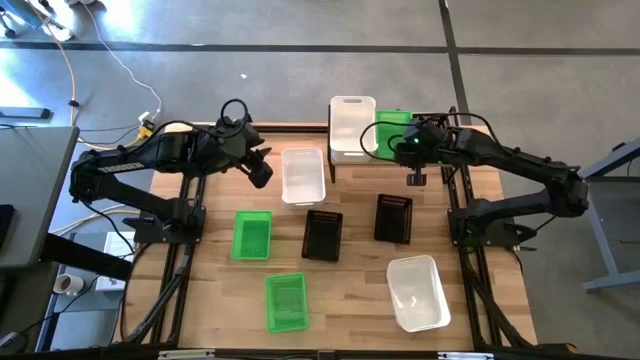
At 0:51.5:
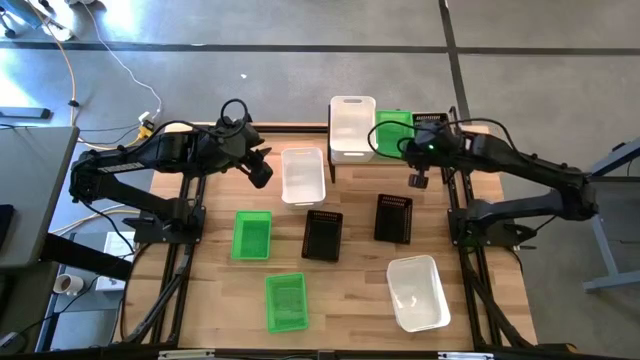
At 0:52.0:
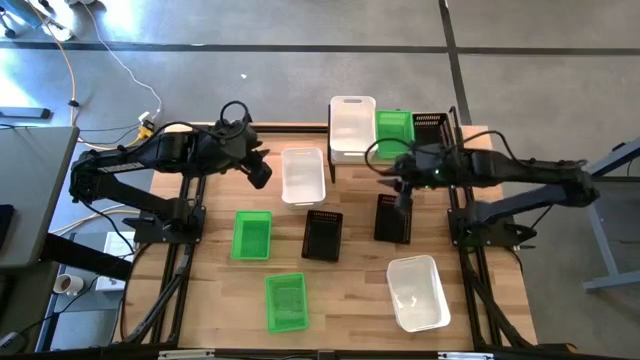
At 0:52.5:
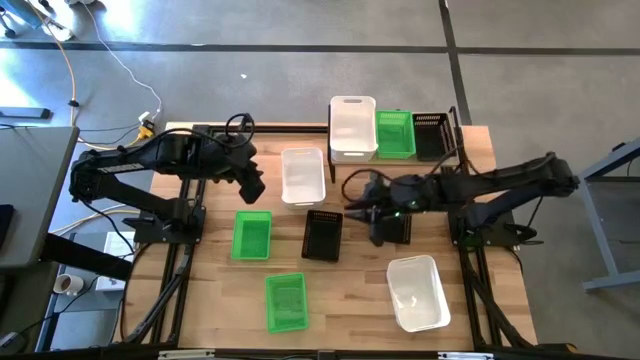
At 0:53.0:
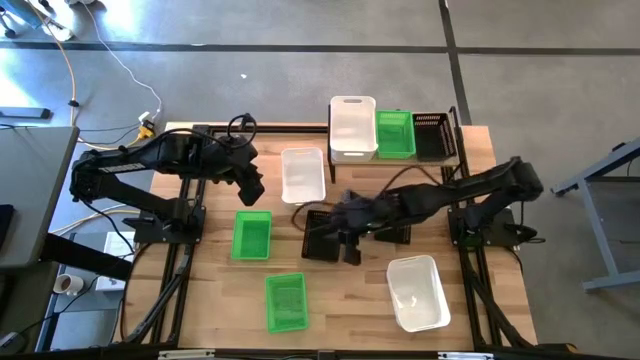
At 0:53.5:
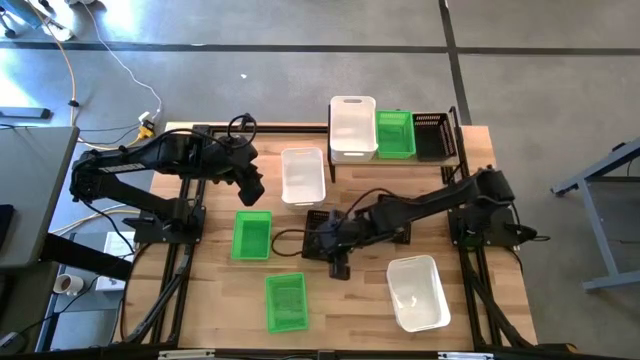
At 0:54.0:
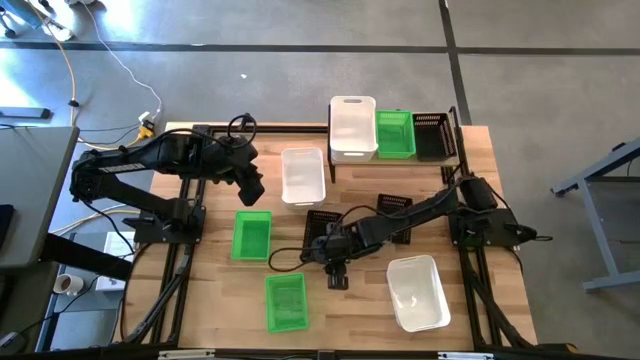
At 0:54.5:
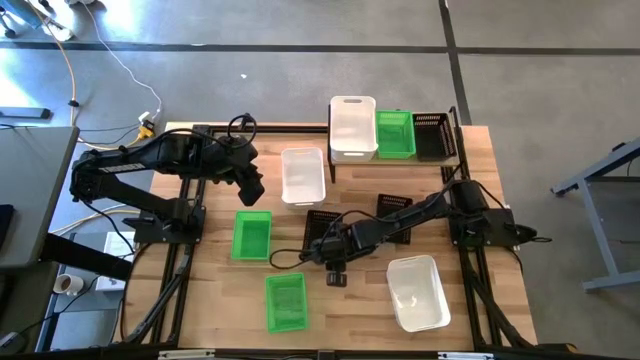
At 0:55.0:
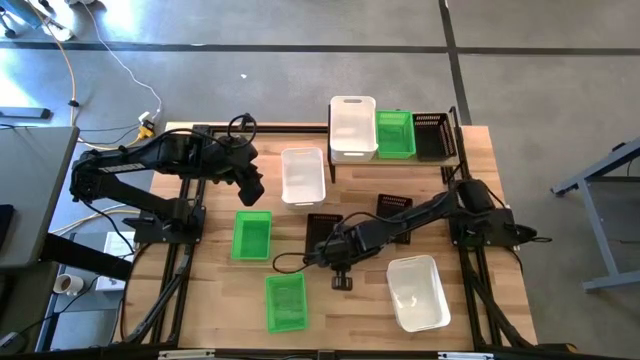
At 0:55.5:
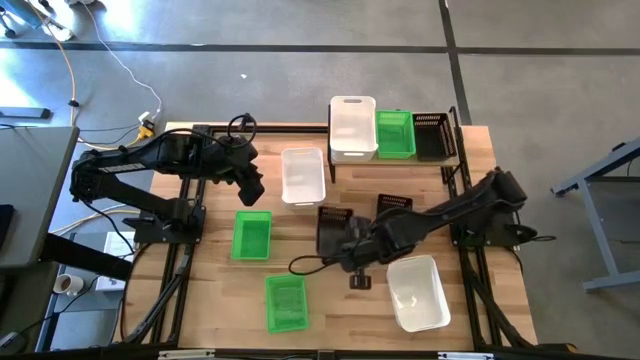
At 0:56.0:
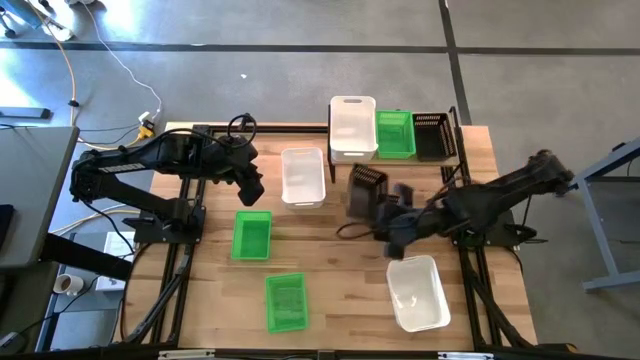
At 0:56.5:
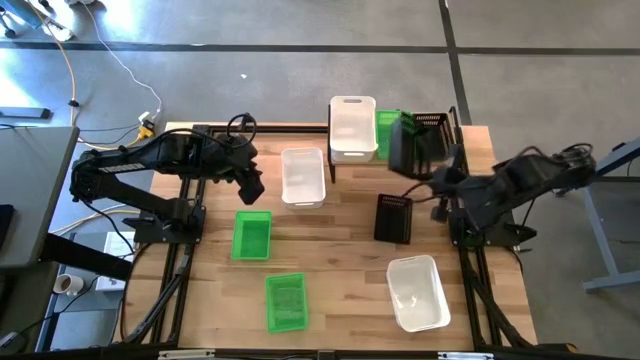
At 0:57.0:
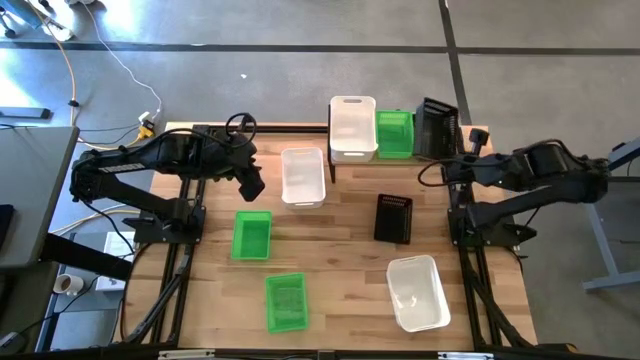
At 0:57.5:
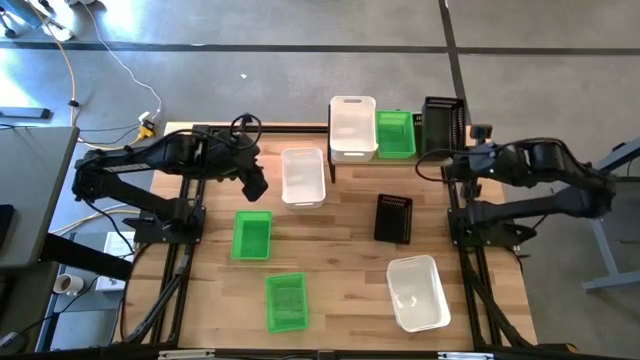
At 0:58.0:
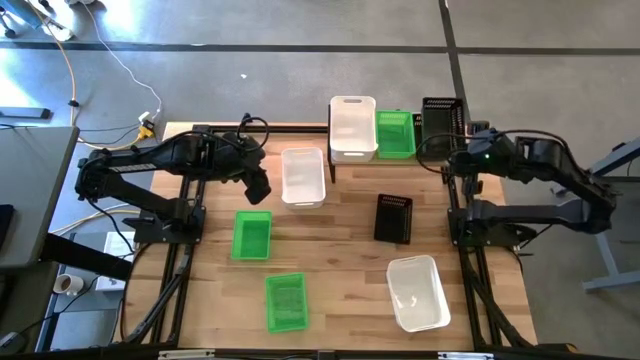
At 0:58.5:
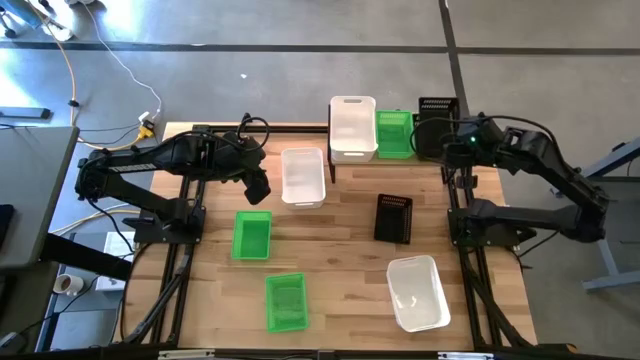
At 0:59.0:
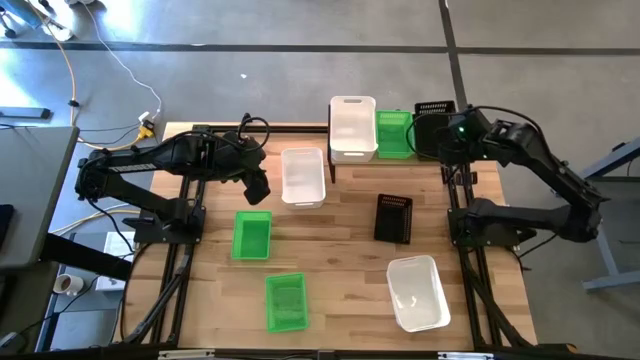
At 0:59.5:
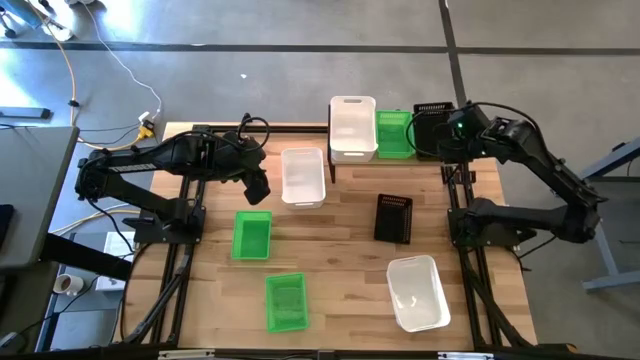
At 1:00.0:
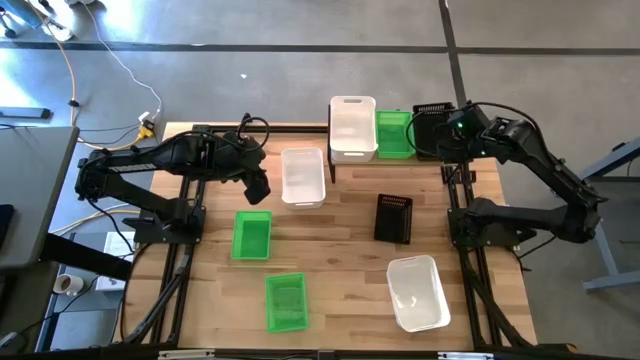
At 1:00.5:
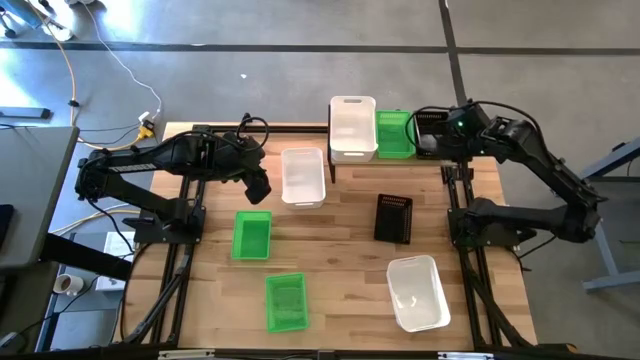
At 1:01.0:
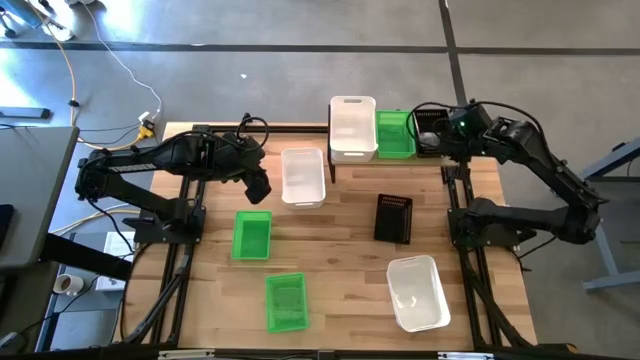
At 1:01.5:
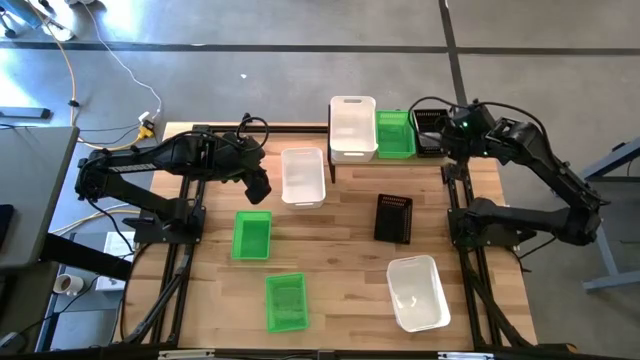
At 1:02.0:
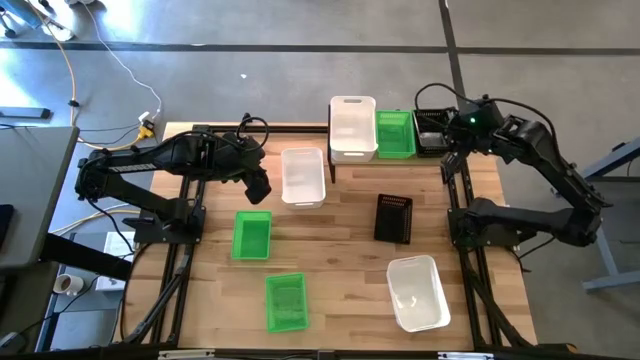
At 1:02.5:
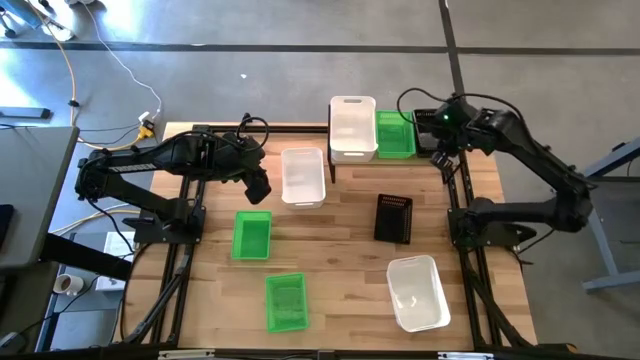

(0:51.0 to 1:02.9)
Task: Stack baskets on shelf by color
Stack the left black bin on top of the black bin

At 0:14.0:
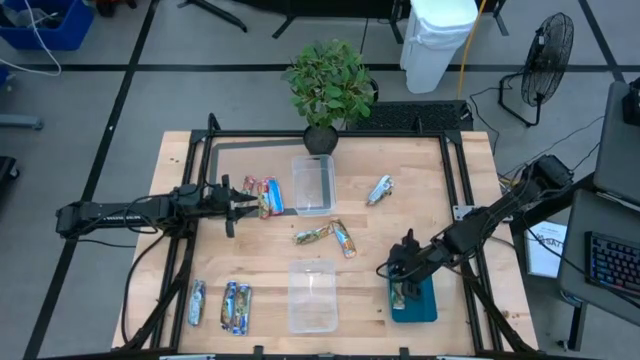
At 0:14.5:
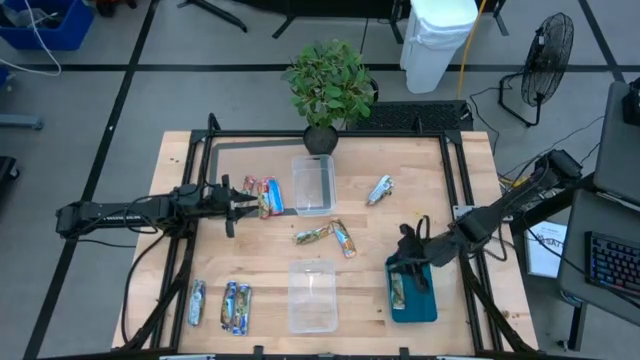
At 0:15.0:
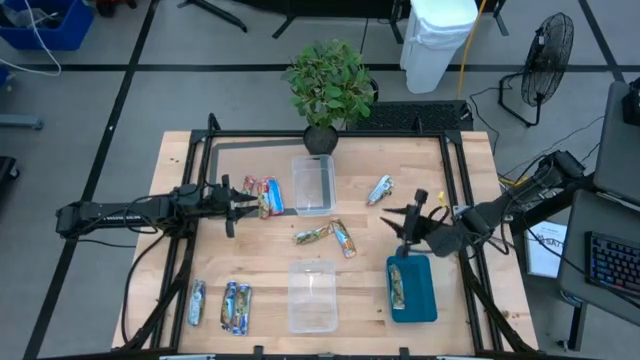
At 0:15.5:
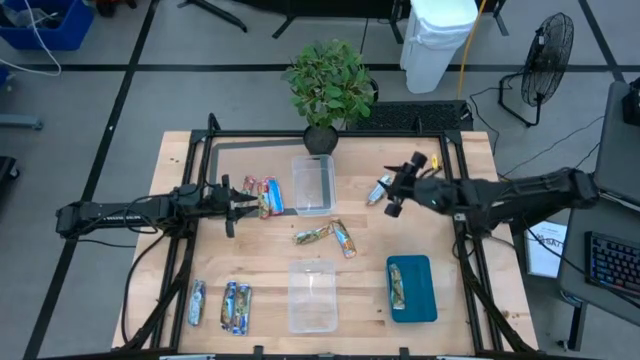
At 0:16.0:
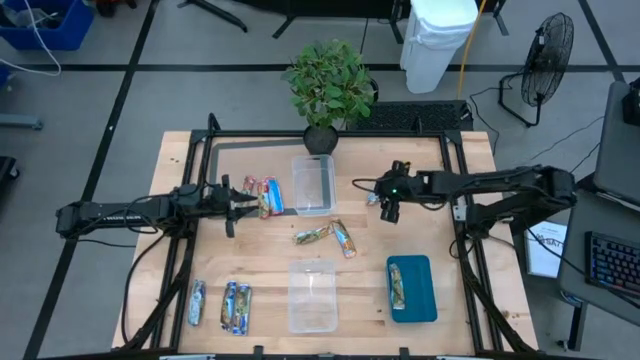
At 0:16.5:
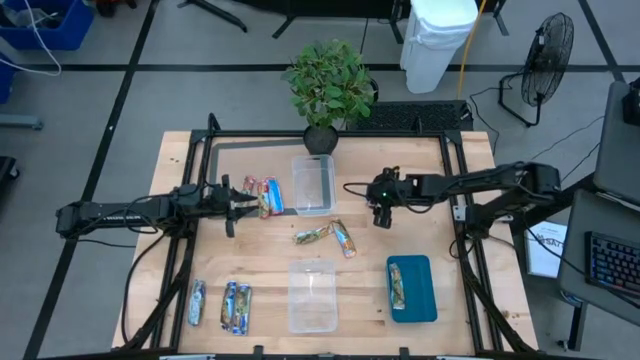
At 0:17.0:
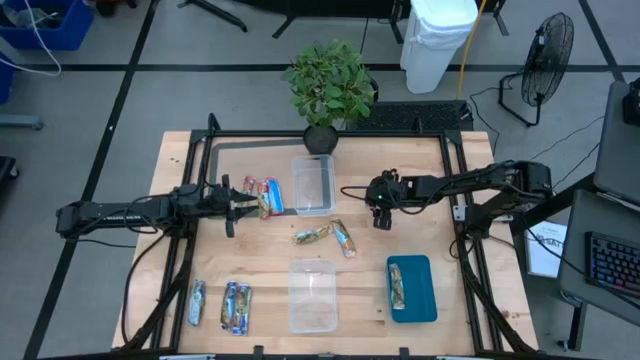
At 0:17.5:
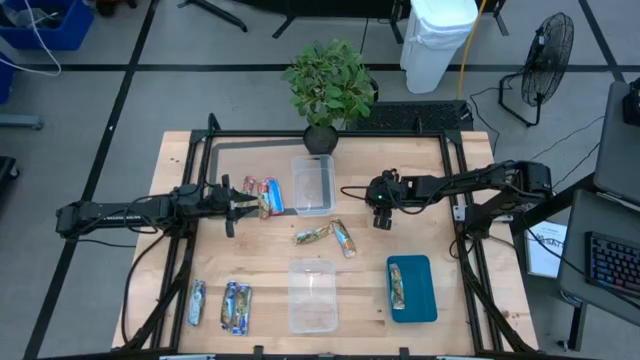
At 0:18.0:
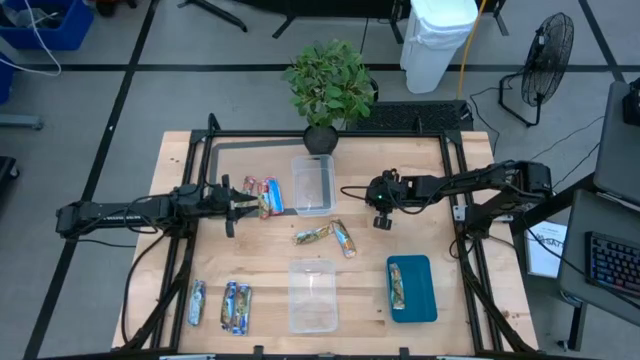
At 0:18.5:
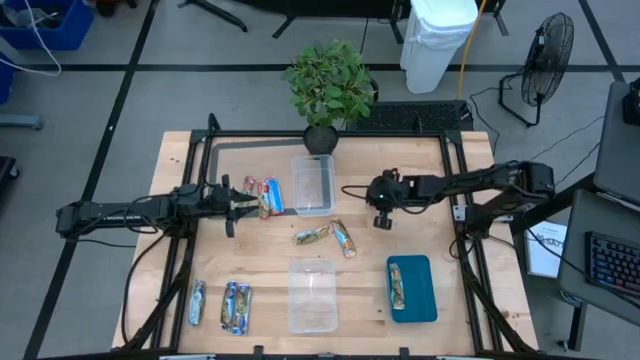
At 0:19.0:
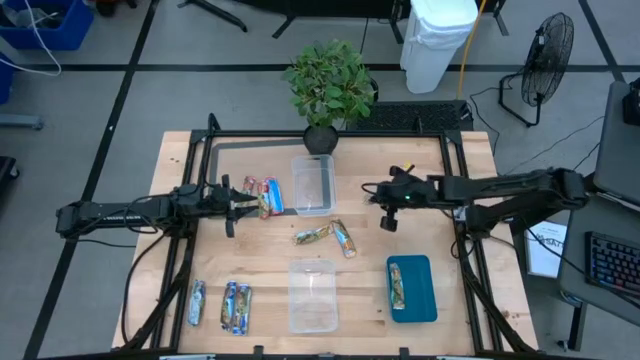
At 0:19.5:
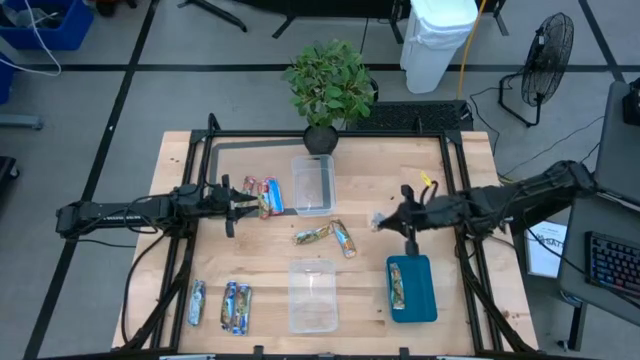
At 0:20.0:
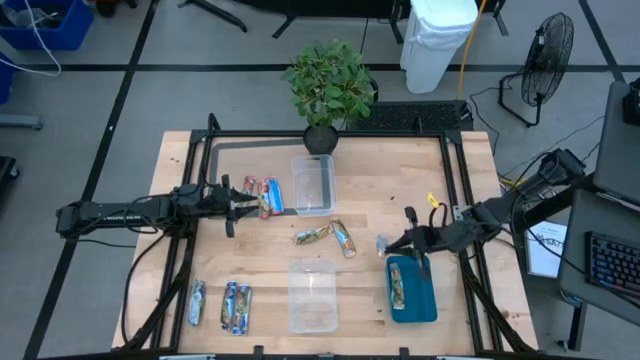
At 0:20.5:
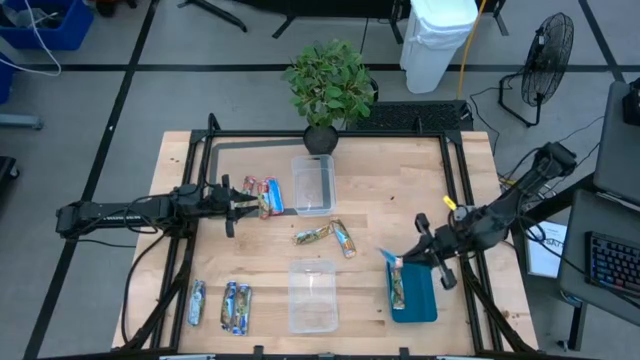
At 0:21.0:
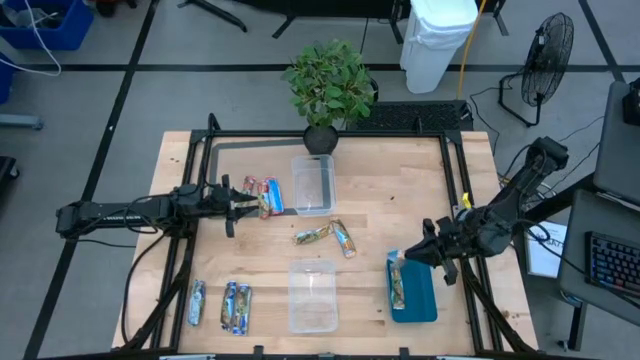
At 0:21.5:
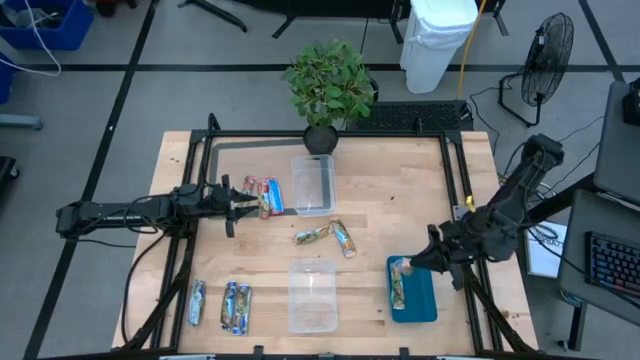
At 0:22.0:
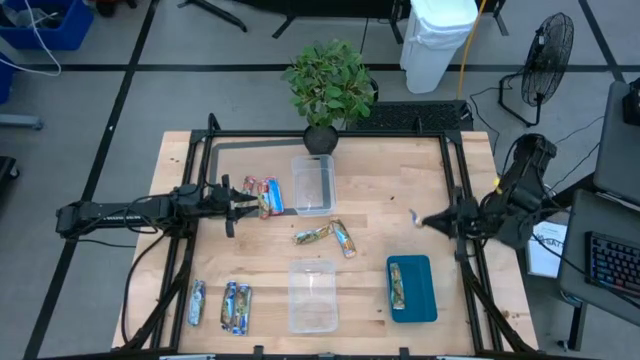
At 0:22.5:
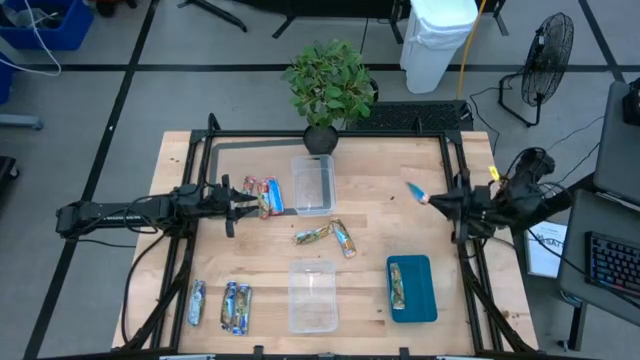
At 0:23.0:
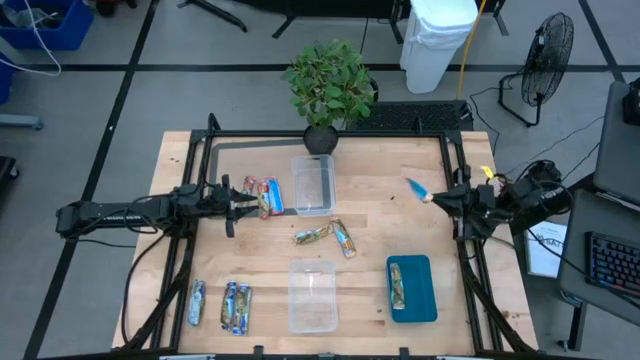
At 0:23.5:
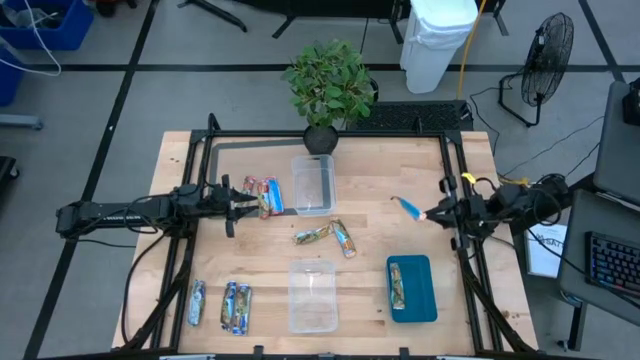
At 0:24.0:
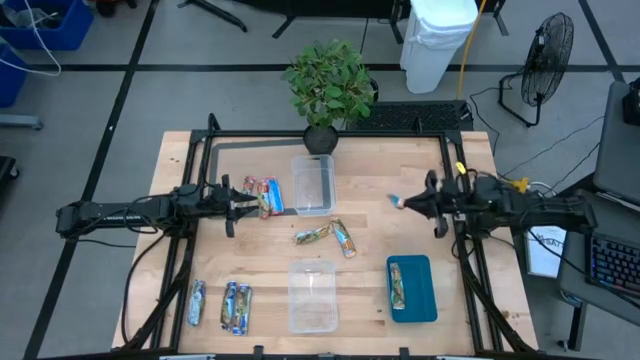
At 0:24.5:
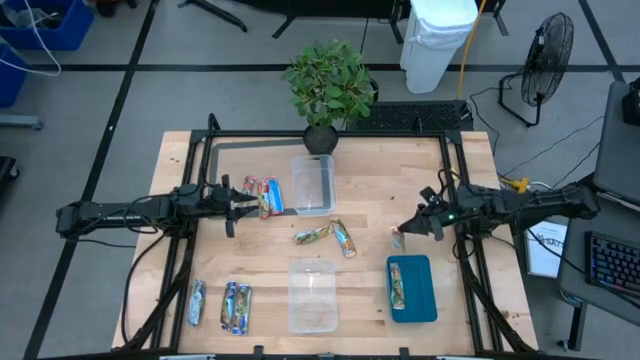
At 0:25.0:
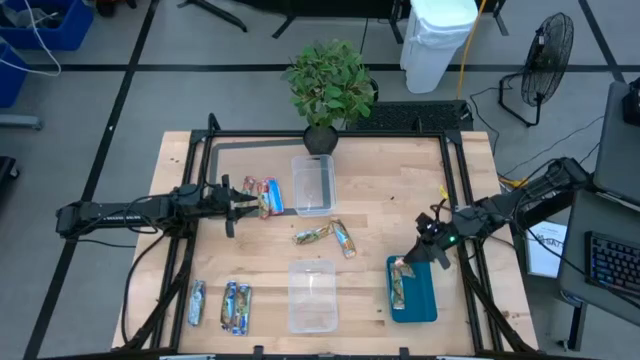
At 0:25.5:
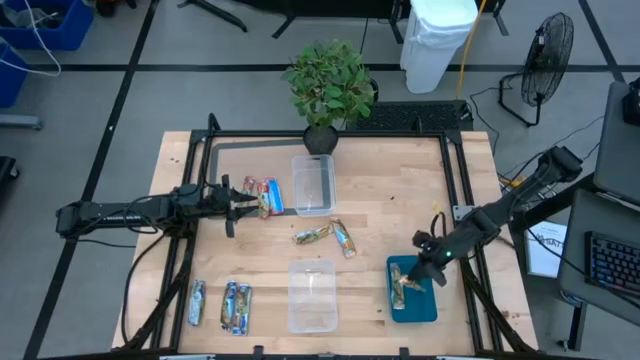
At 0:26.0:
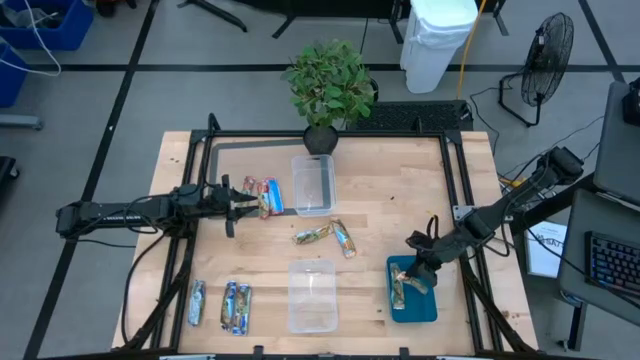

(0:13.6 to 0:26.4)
Task: Pick and place Granola Bars by type
Put the yellow granola bar into the blue bin
